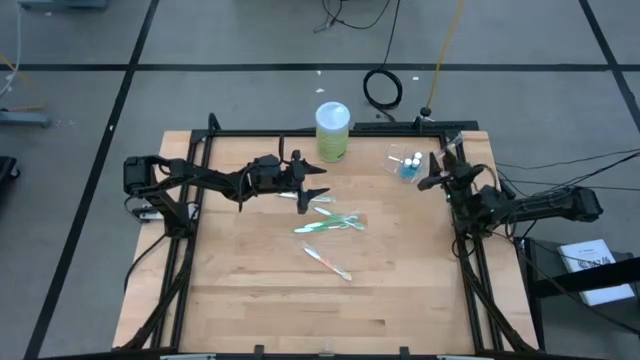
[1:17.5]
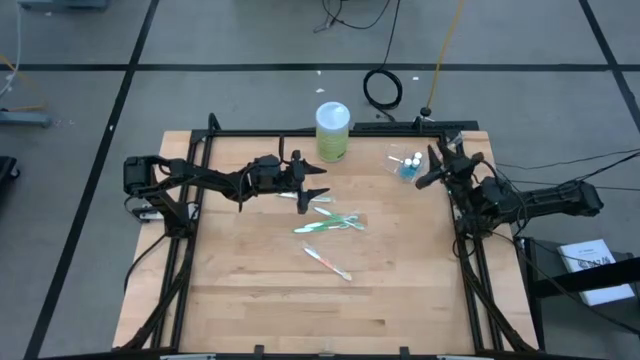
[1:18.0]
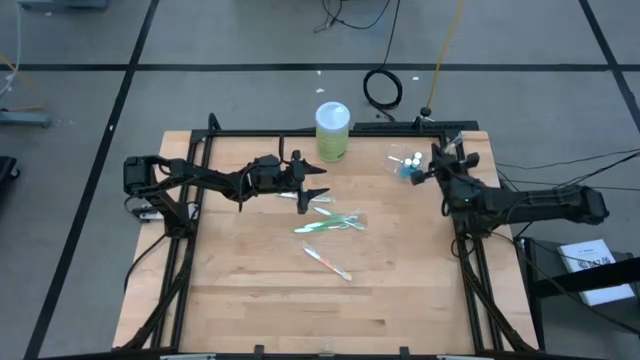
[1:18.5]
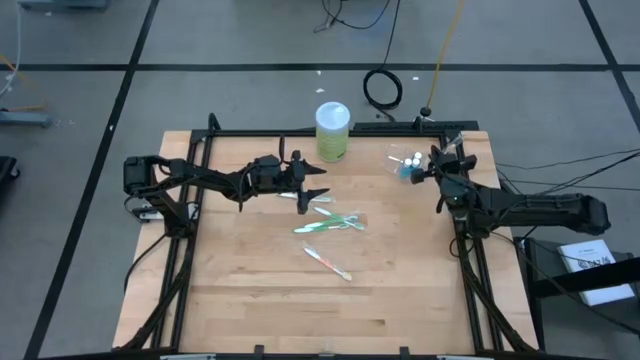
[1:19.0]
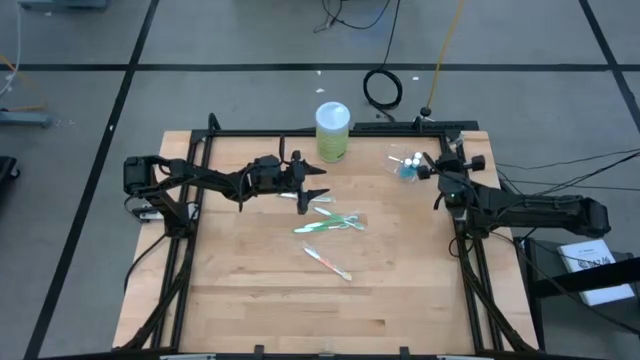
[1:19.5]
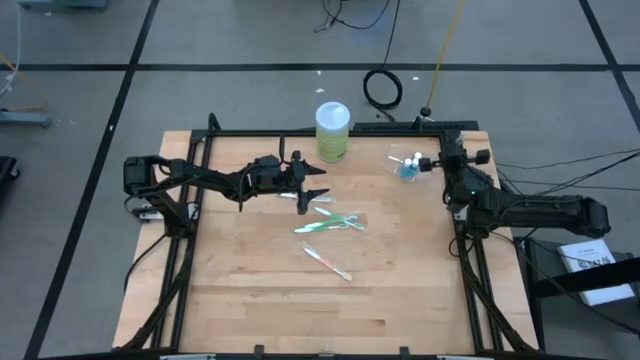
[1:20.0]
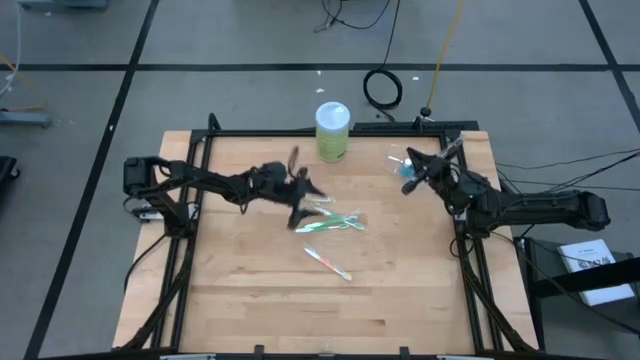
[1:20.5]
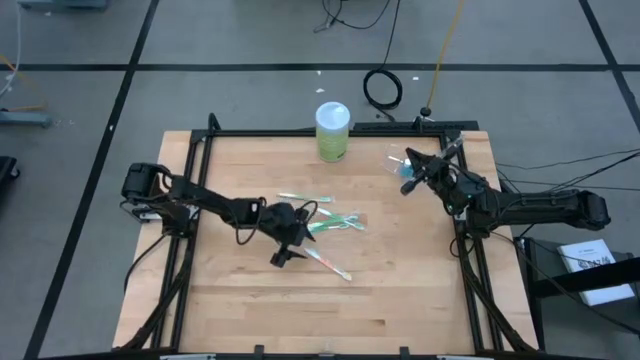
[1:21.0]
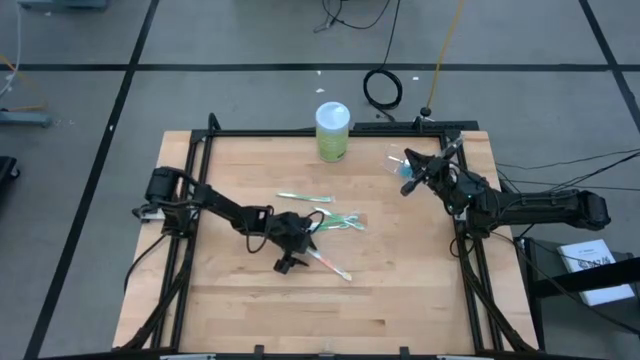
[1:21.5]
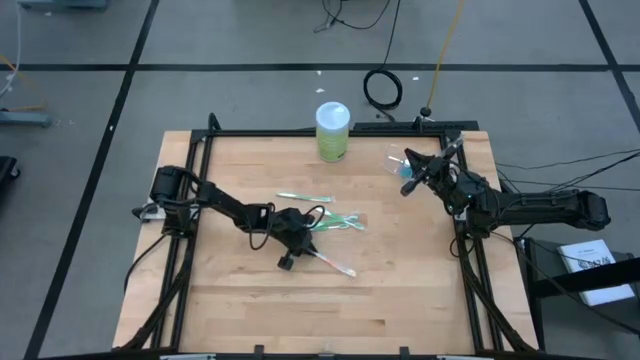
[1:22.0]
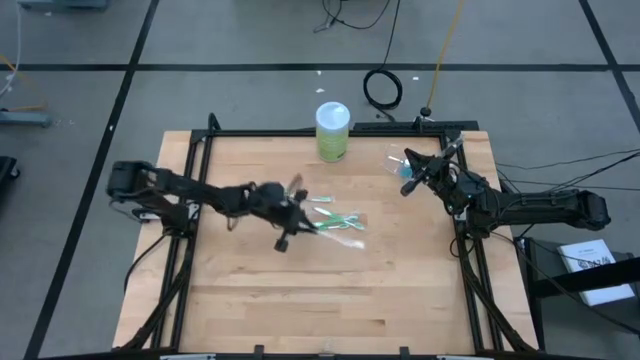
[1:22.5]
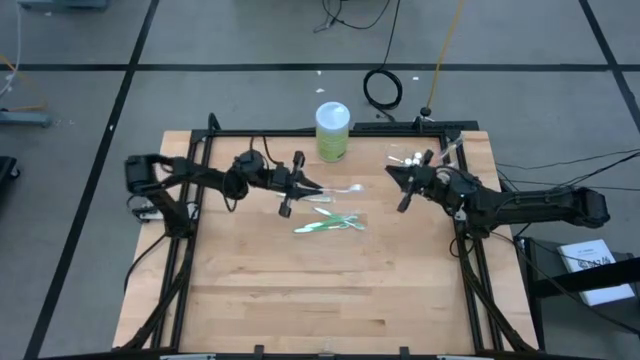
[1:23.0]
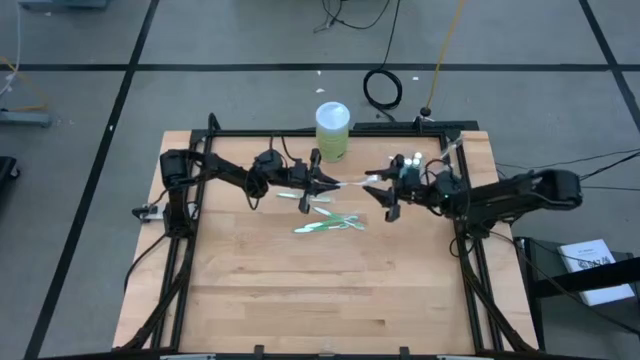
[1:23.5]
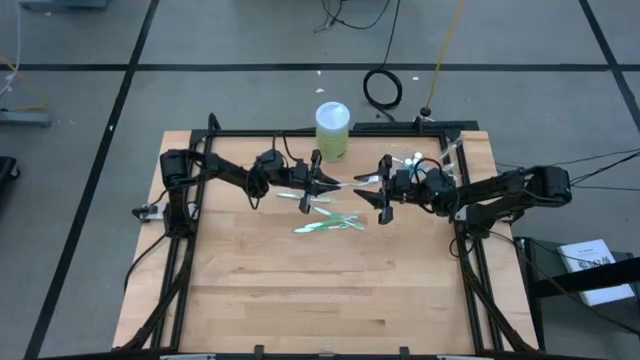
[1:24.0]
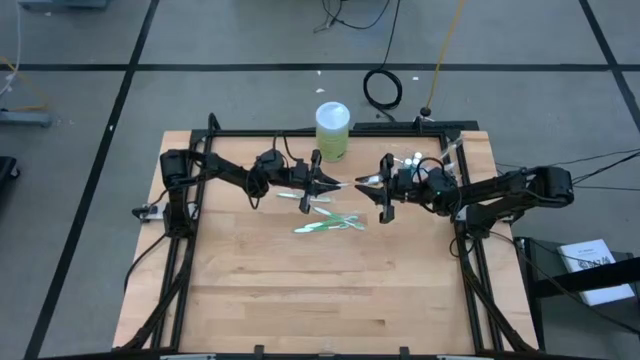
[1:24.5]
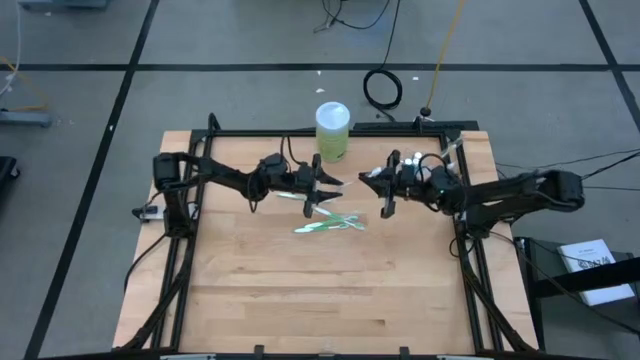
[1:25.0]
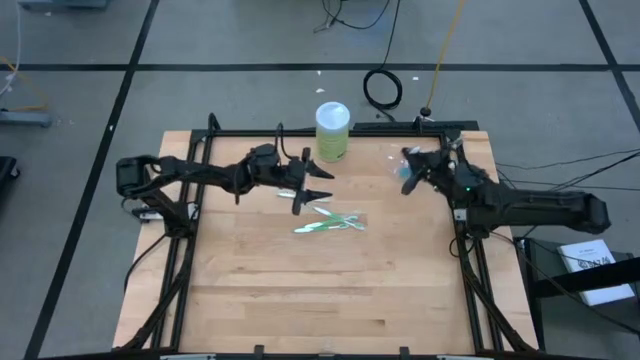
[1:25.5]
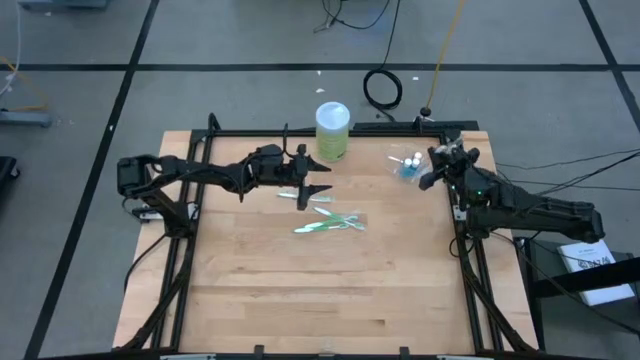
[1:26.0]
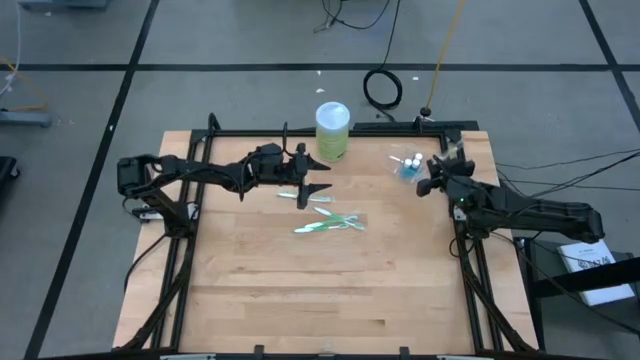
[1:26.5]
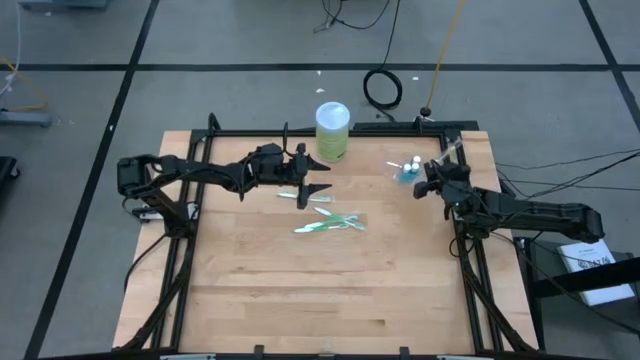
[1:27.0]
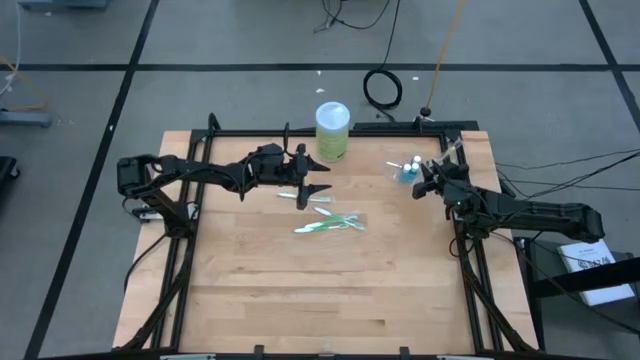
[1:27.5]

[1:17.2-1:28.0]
Task: Pick & Place toothbrushing station
Put the orange toothbrush into the transparent organizer

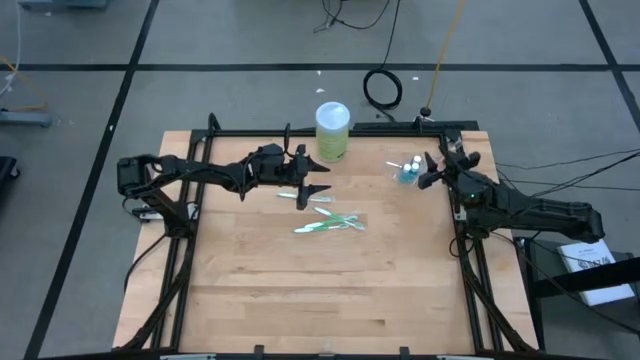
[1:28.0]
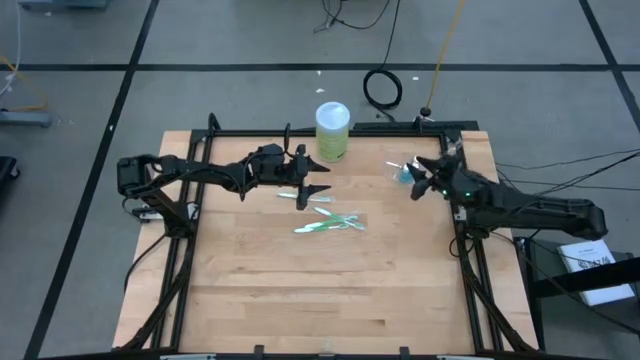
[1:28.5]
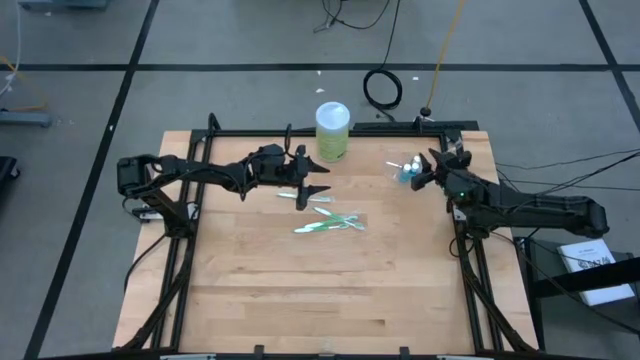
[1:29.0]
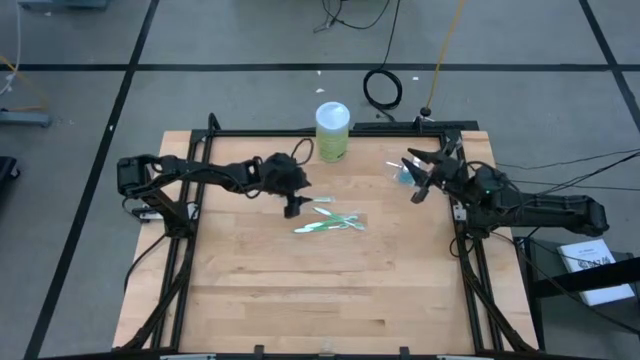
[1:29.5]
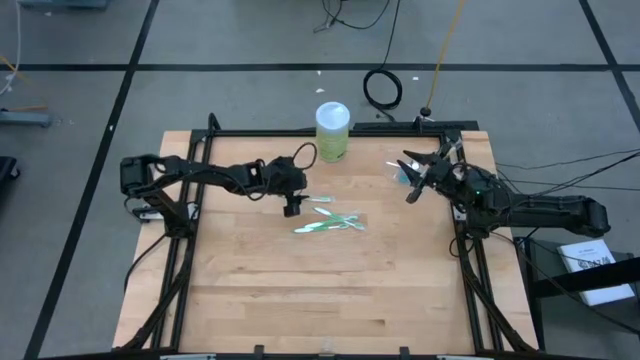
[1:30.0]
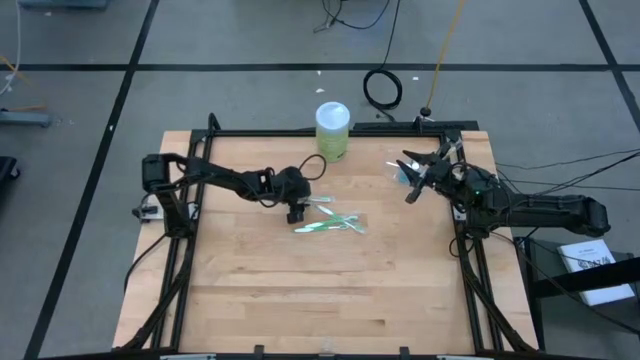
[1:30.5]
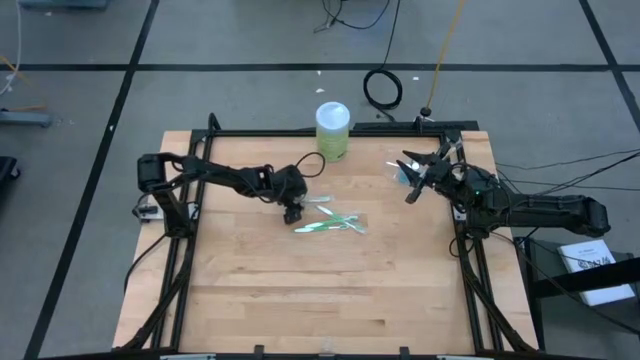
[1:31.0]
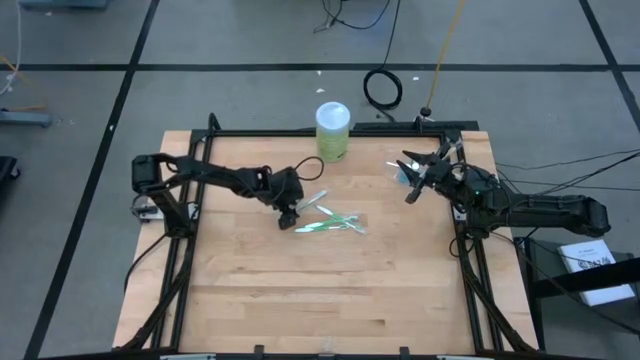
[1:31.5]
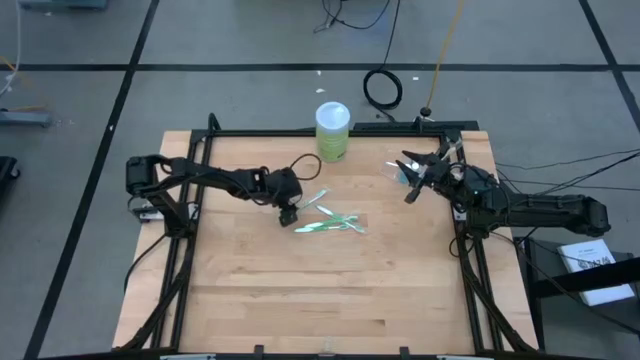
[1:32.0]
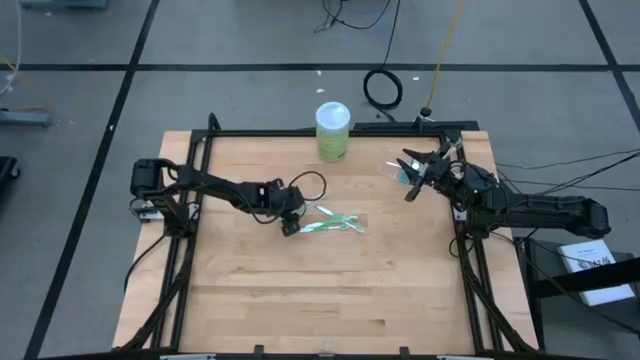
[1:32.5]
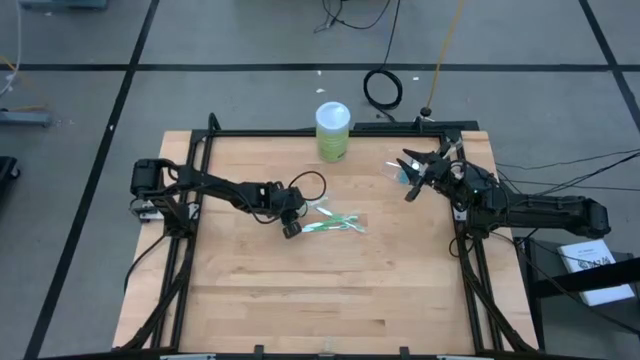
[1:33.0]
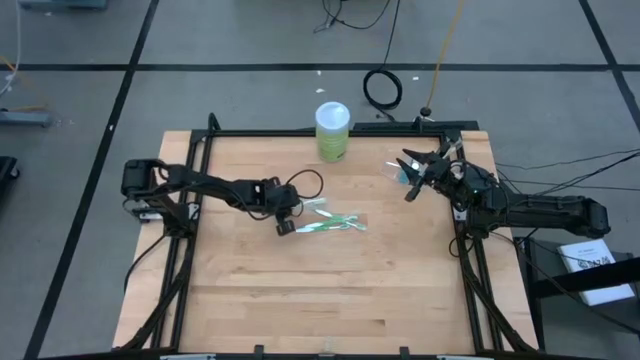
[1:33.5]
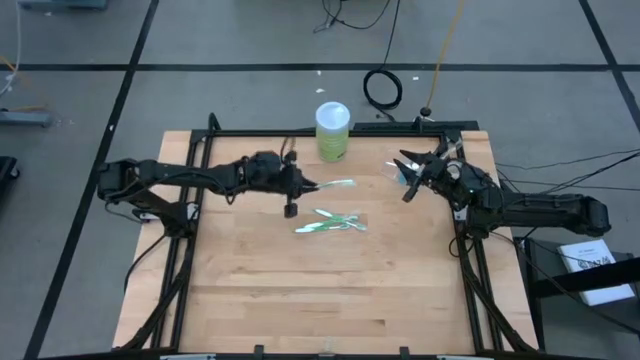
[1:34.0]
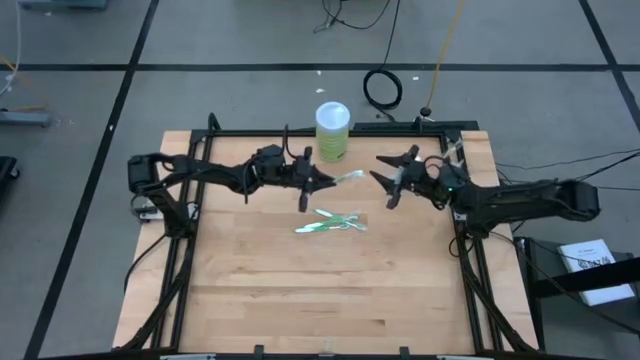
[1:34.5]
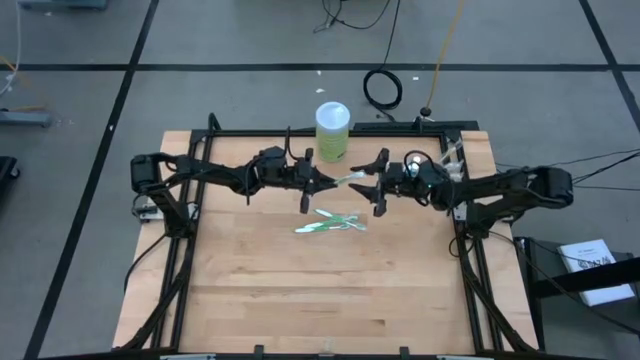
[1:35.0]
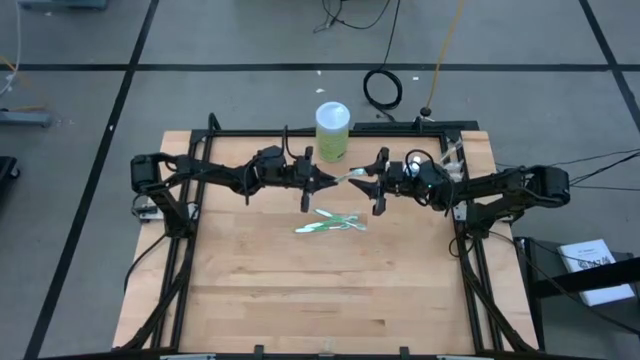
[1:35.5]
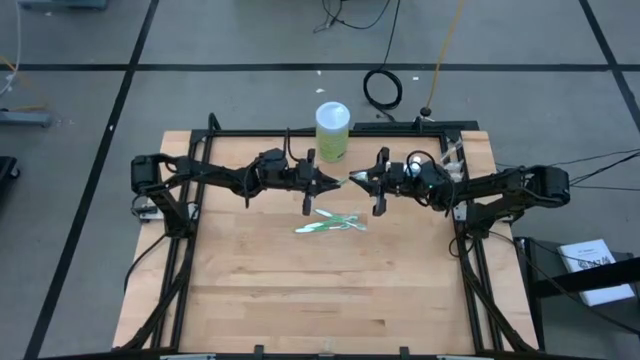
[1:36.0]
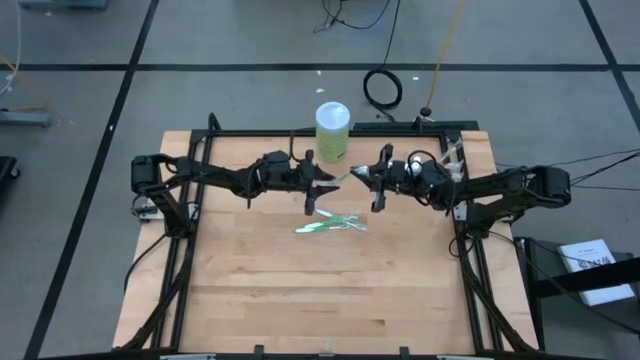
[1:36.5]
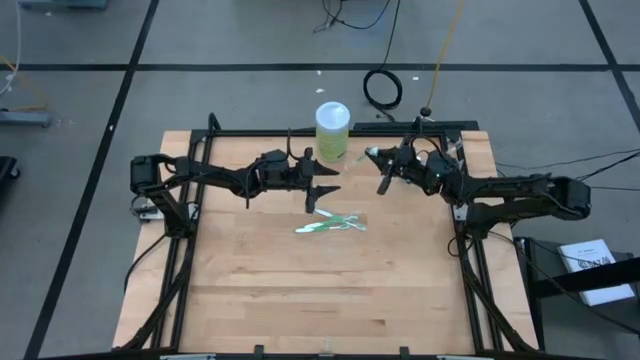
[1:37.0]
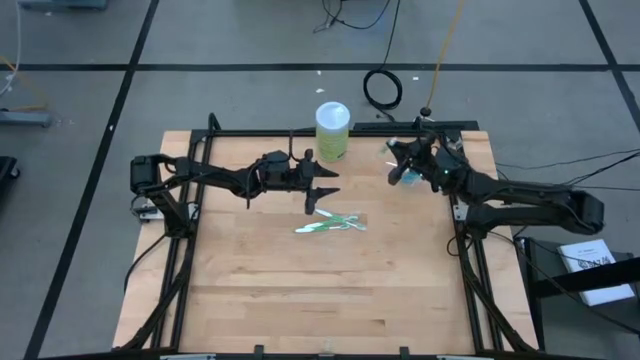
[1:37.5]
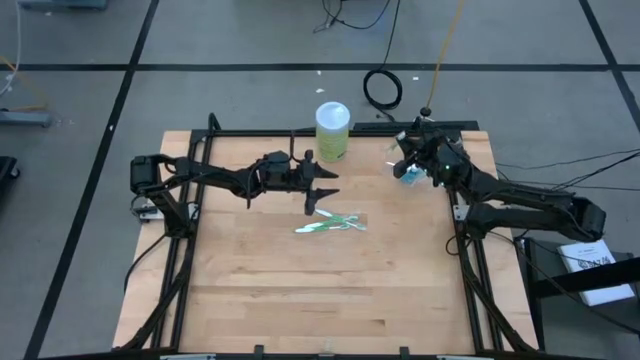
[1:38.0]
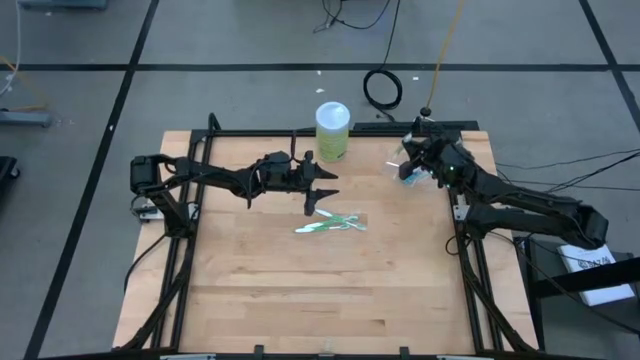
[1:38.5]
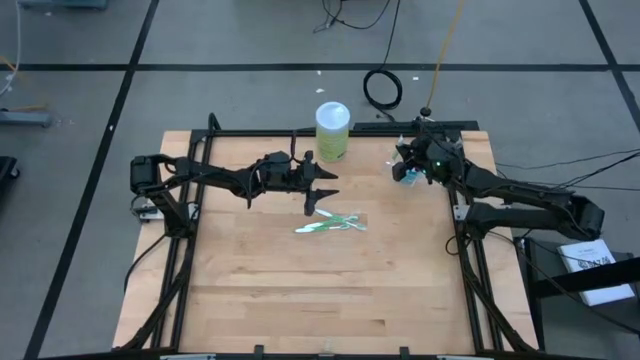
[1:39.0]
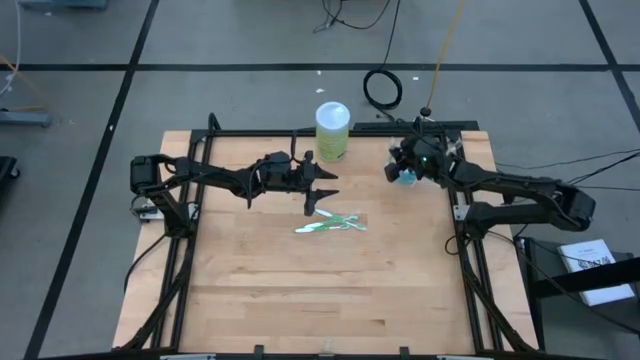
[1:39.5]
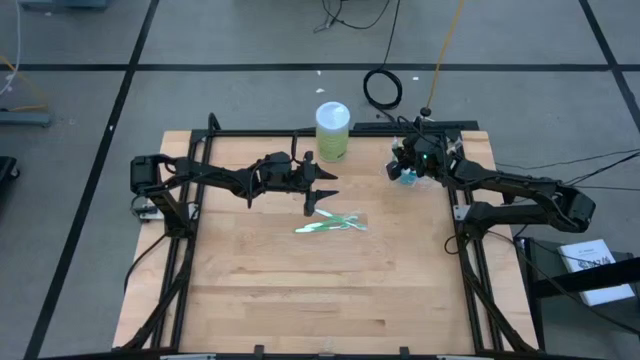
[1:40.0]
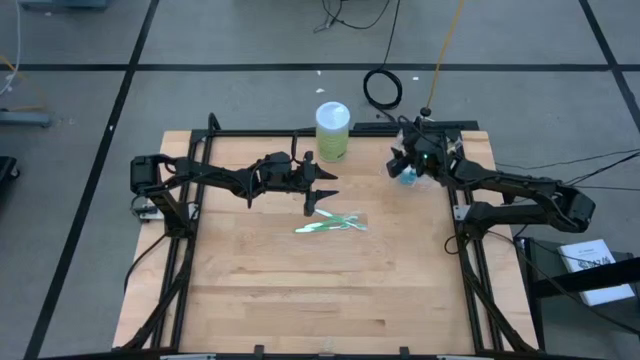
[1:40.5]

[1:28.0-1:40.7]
Put the green toothbrush into the transparent organizer
